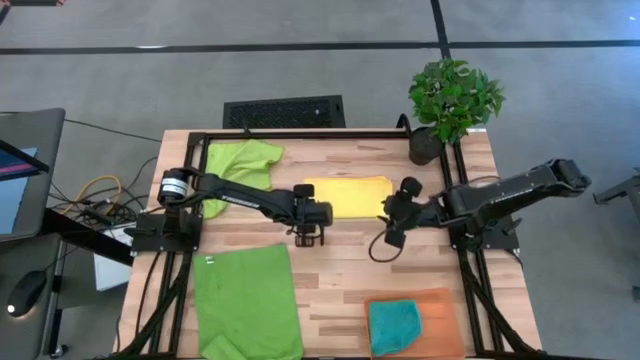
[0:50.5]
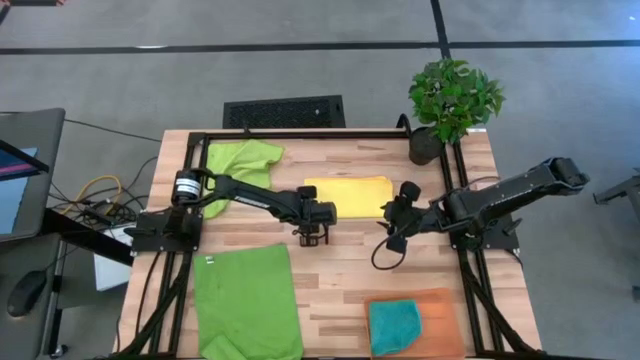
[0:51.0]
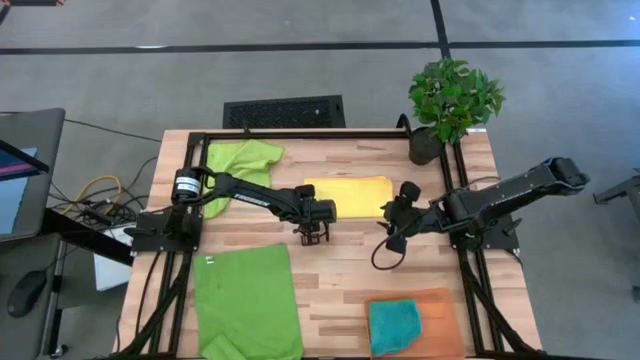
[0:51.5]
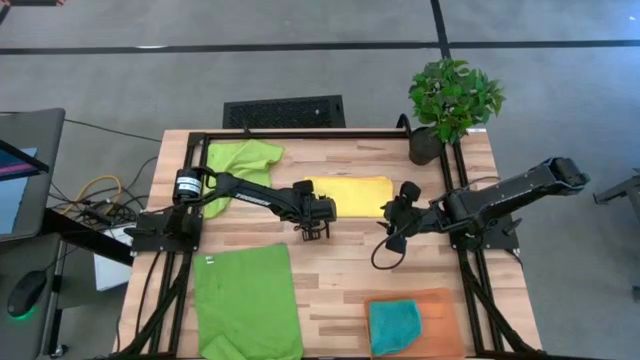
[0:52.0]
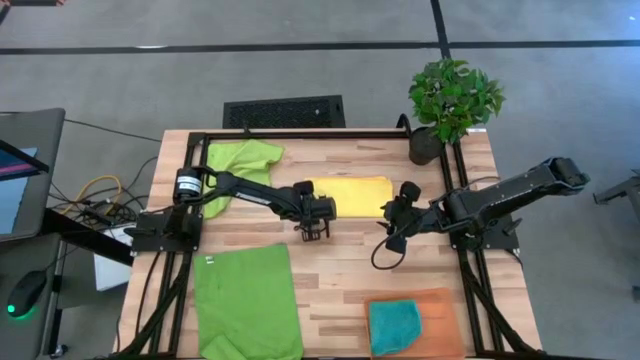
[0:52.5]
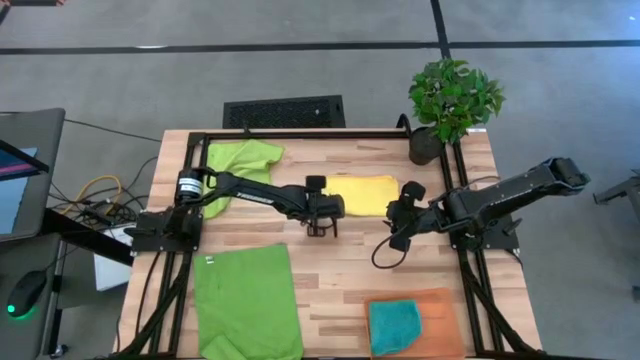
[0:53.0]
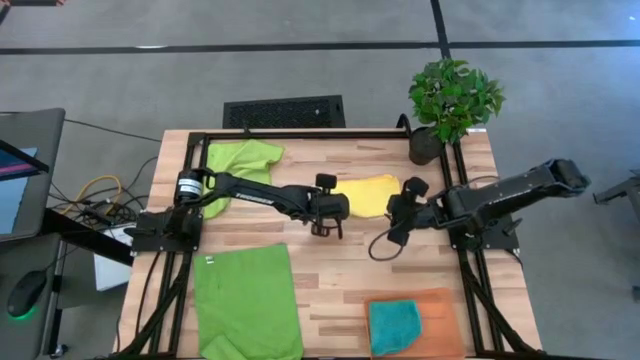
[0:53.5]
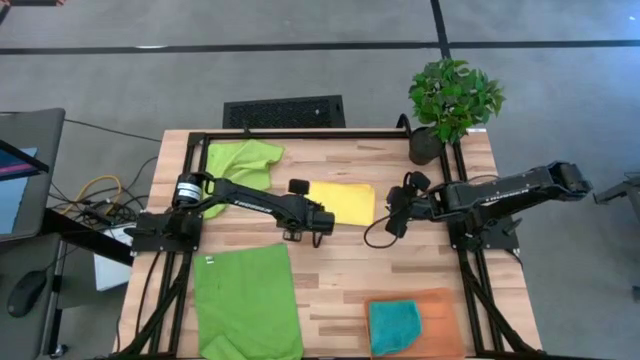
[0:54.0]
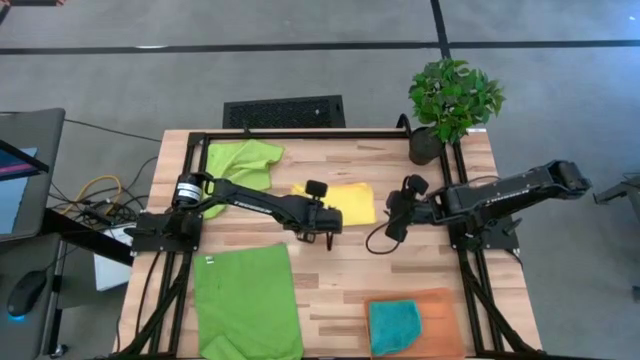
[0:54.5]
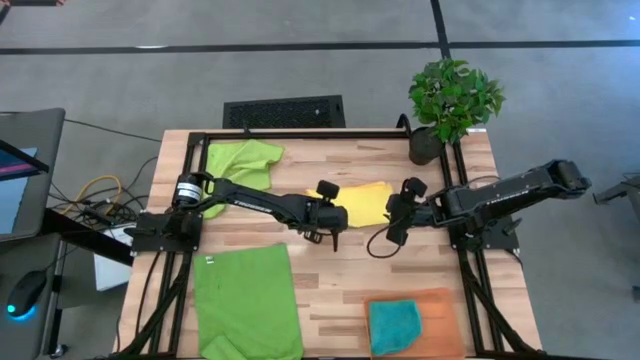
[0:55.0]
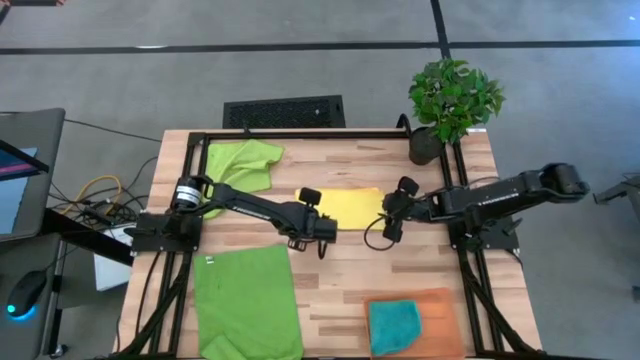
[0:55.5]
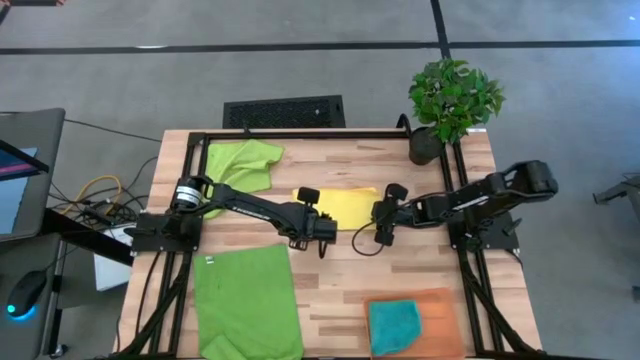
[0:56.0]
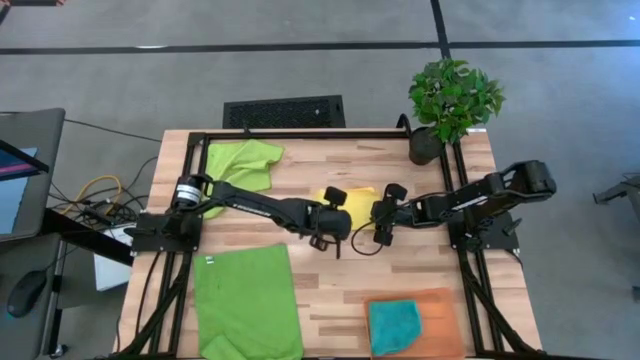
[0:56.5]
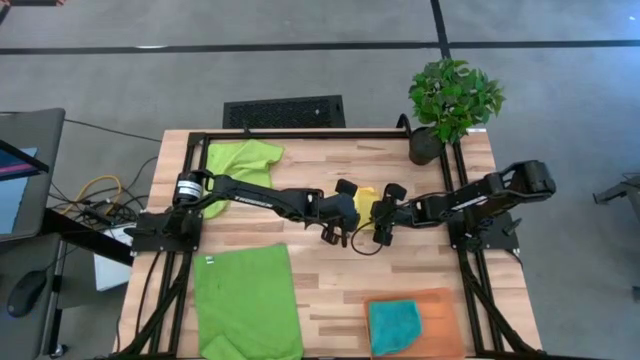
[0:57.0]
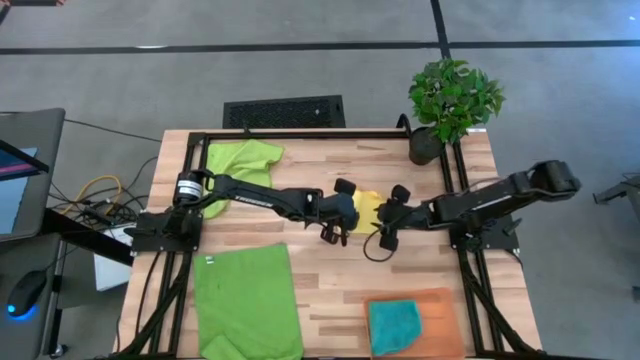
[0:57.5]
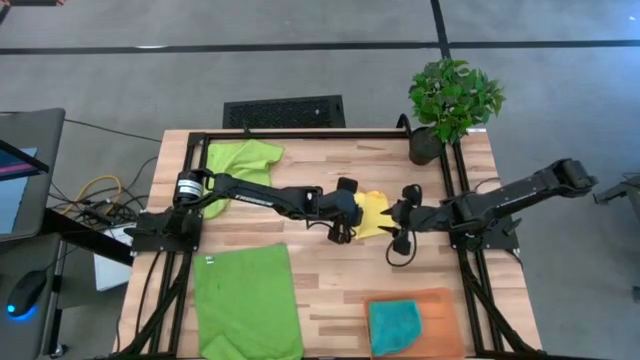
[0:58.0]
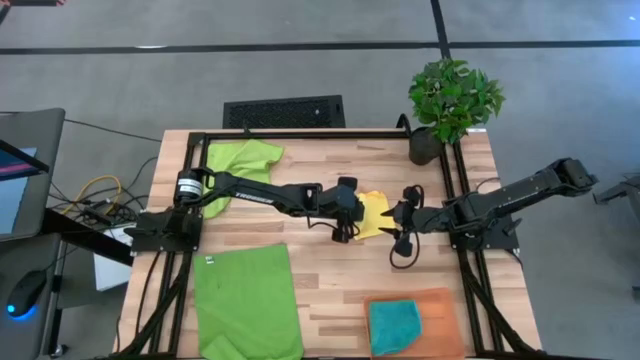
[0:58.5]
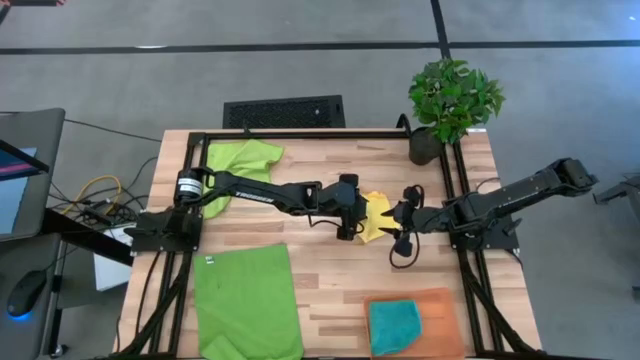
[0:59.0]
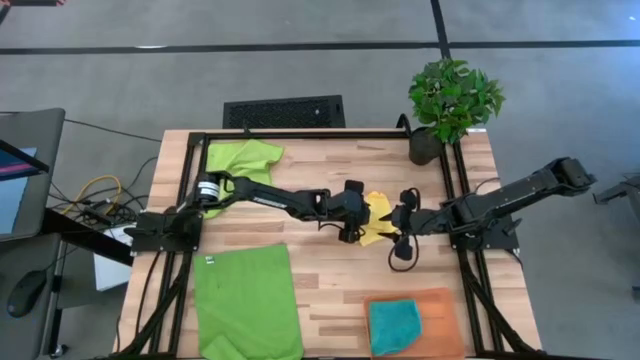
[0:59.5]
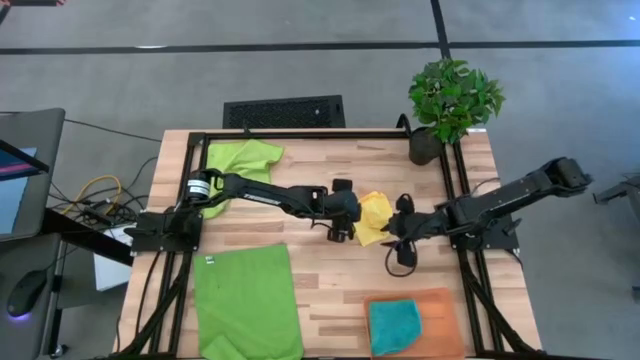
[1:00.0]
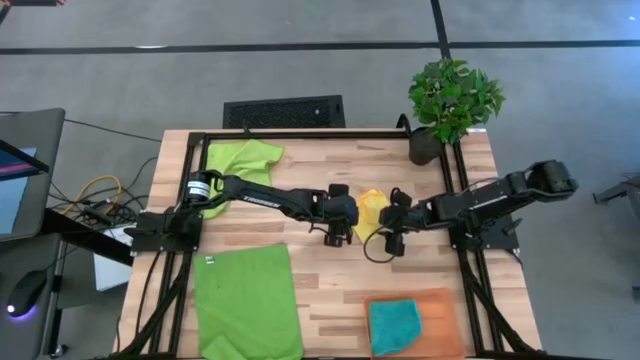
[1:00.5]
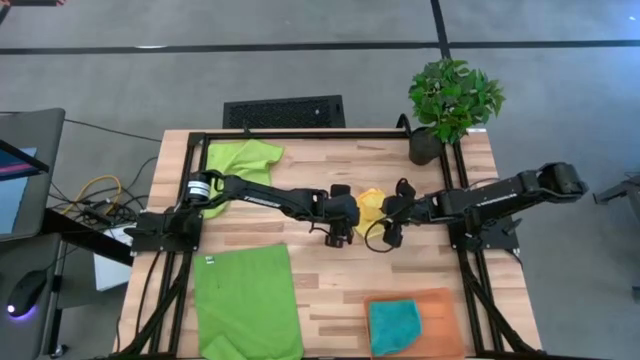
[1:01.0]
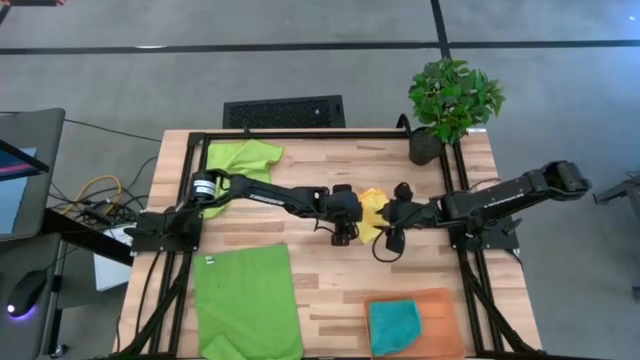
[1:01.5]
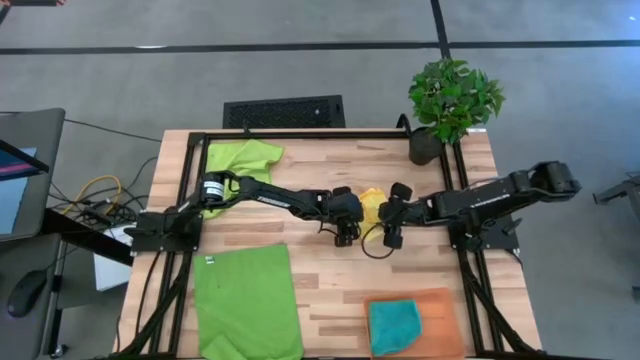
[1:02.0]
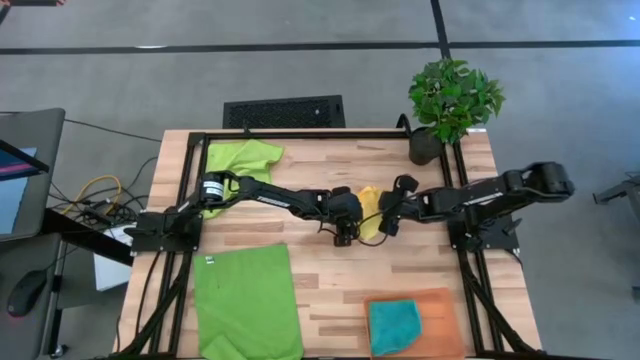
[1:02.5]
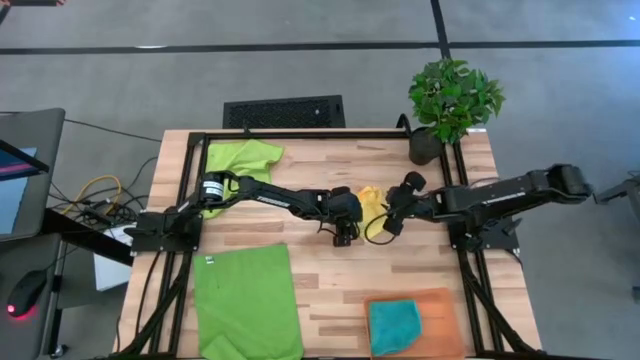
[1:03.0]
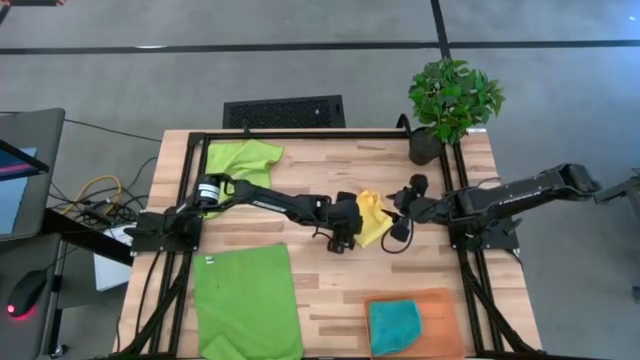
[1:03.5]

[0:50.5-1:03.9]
Task: Fold microfiber towels
Fold the yellow microfiber towel

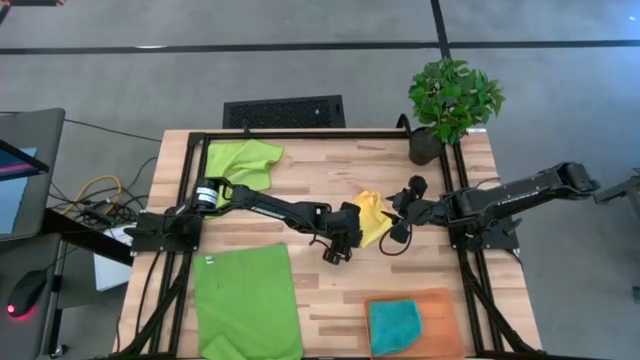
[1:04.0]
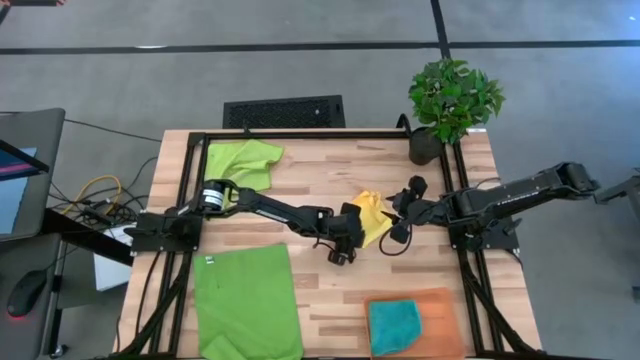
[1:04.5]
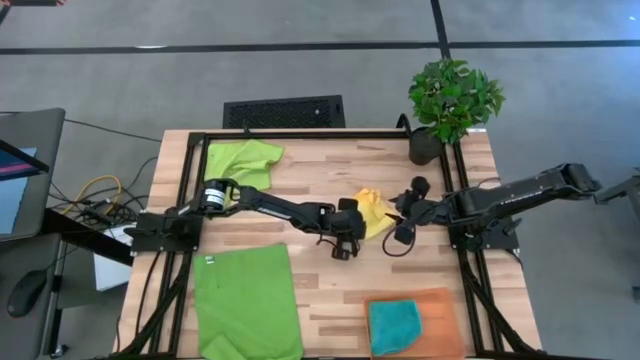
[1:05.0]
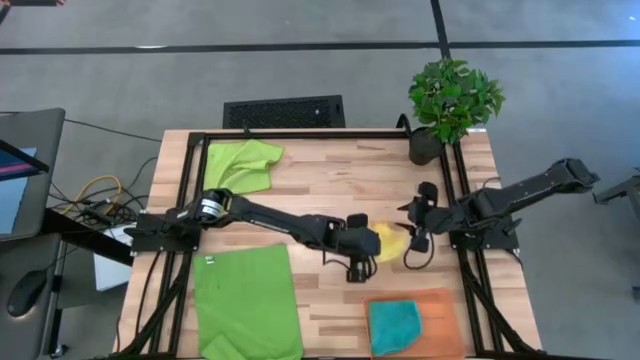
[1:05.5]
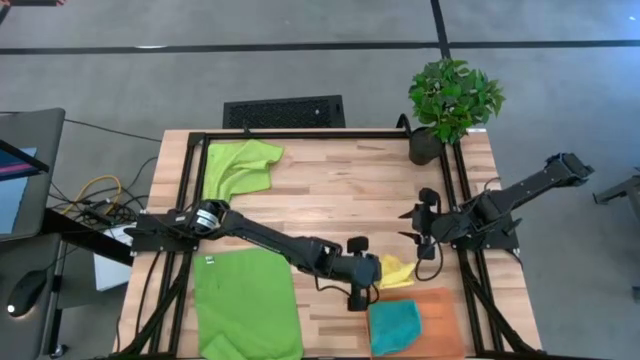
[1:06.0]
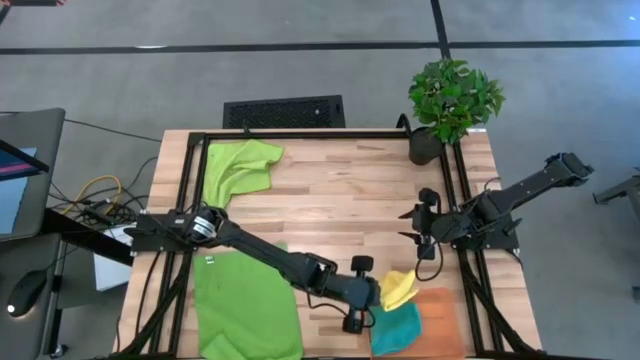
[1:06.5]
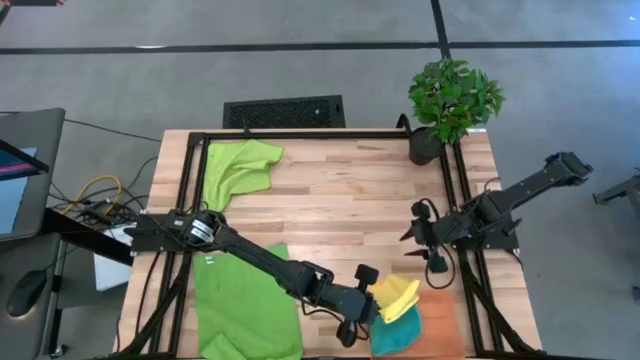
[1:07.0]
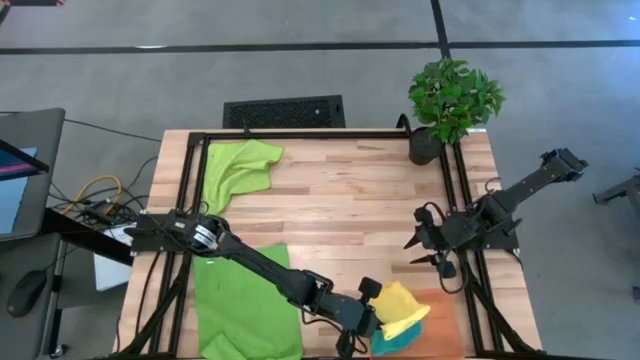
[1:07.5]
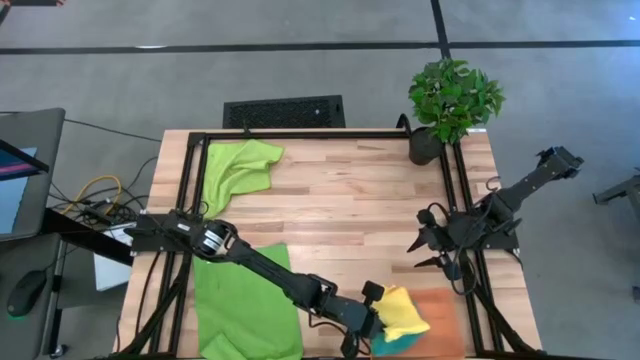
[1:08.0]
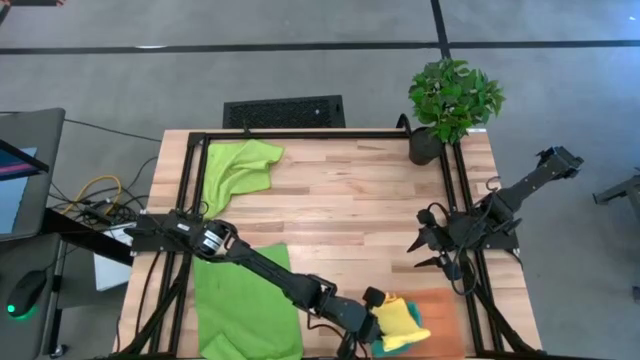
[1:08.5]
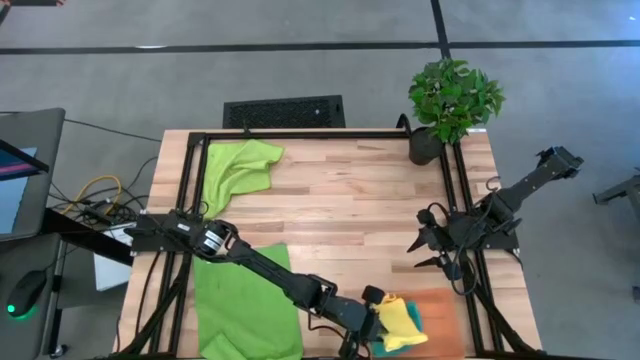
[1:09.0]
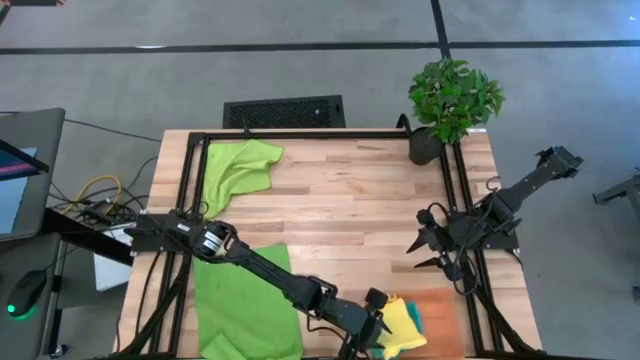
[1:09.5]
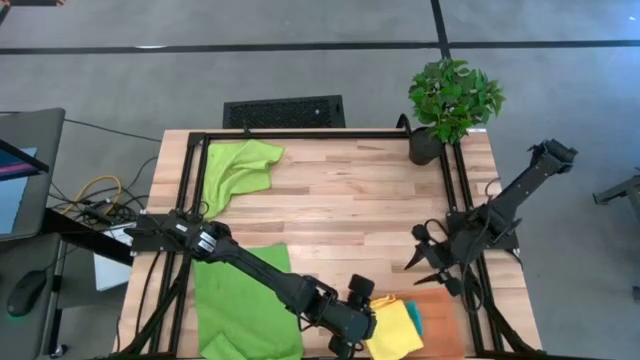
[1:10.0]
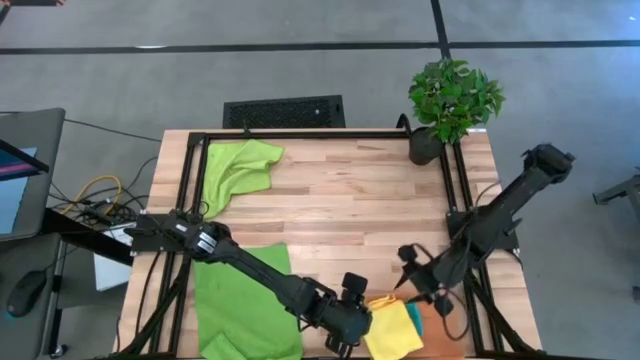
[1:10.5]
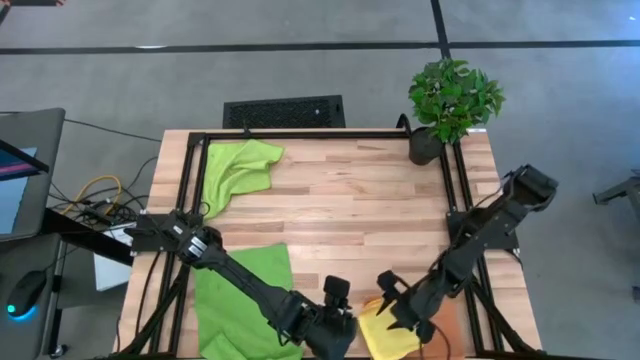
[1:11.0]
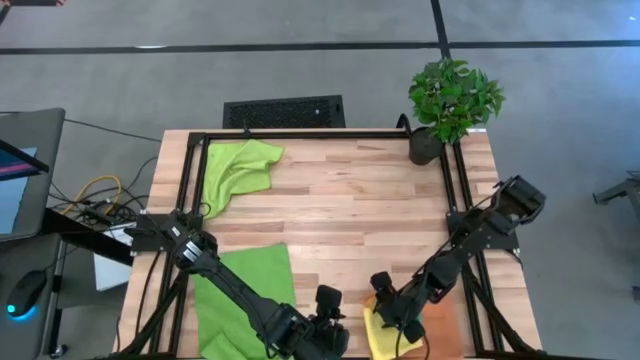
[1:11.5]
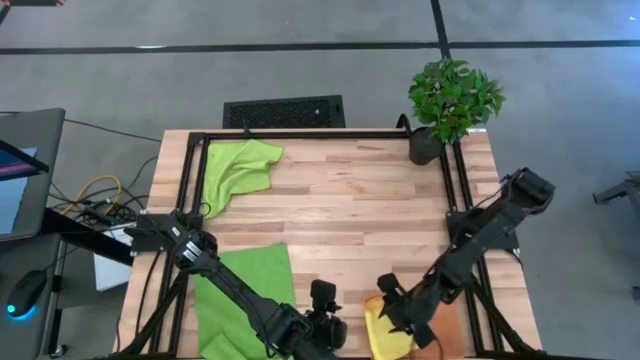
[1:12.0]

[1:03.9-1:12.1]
Put the folded yellow microfiber towel into the orange bin
